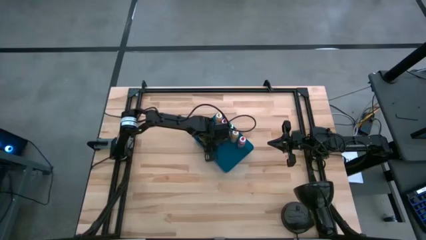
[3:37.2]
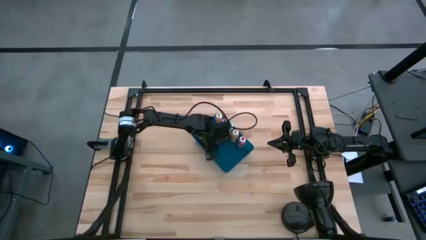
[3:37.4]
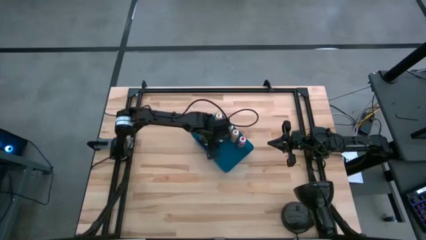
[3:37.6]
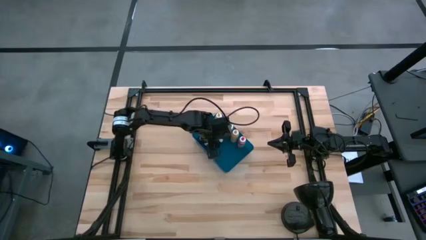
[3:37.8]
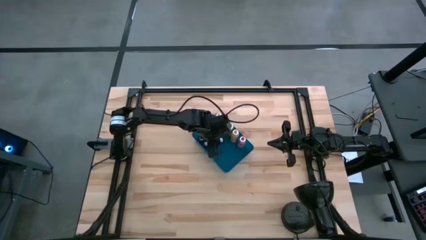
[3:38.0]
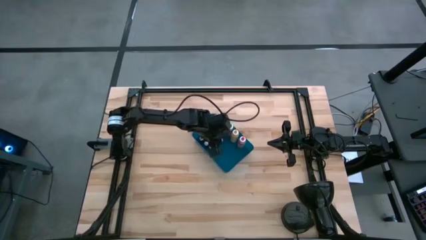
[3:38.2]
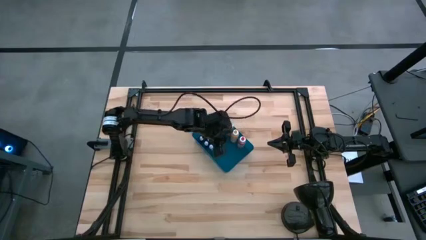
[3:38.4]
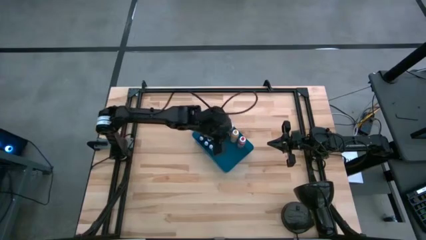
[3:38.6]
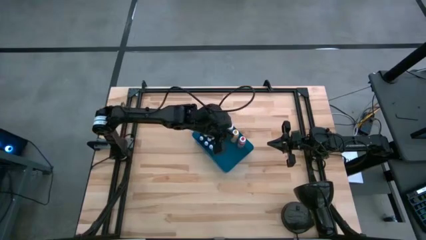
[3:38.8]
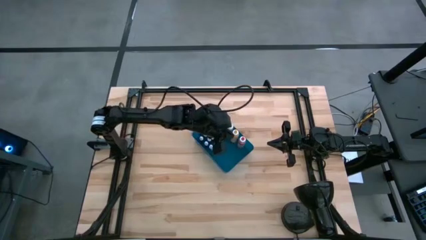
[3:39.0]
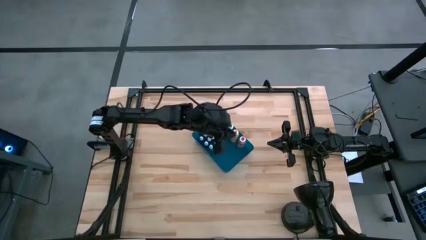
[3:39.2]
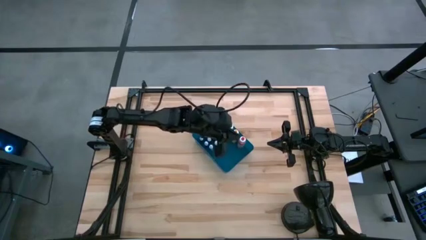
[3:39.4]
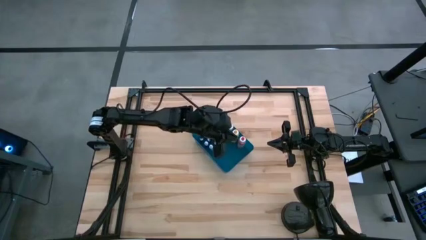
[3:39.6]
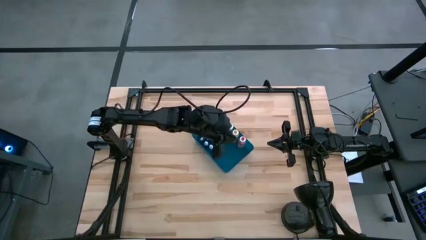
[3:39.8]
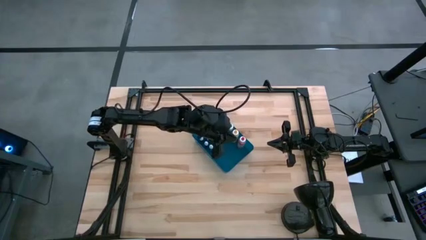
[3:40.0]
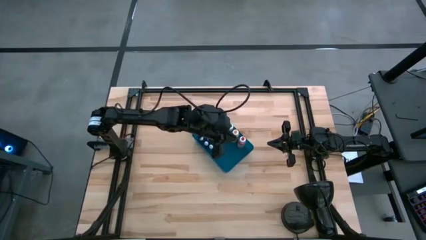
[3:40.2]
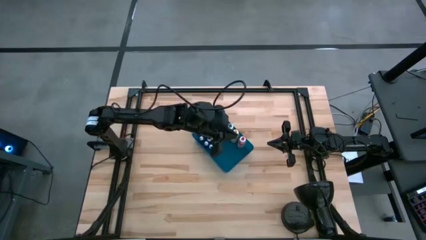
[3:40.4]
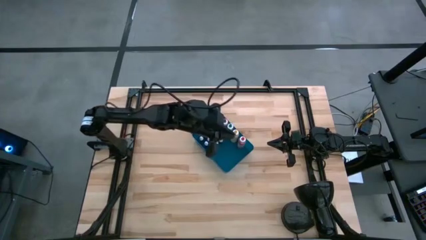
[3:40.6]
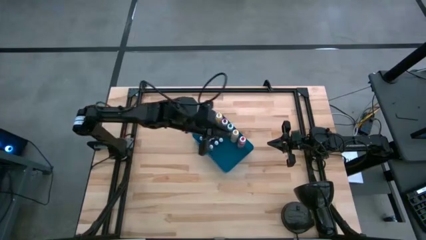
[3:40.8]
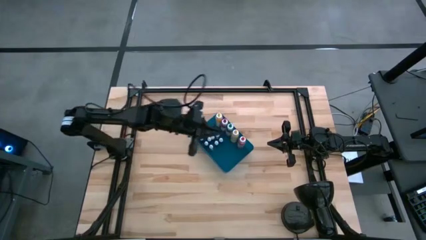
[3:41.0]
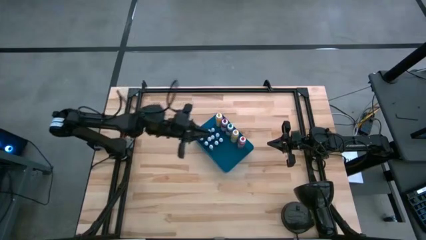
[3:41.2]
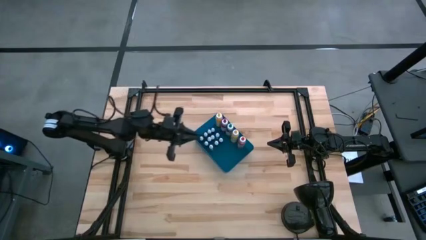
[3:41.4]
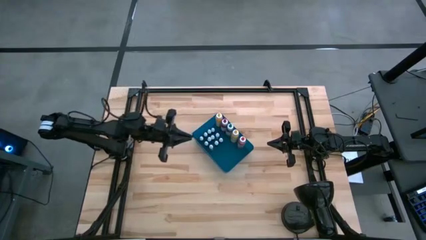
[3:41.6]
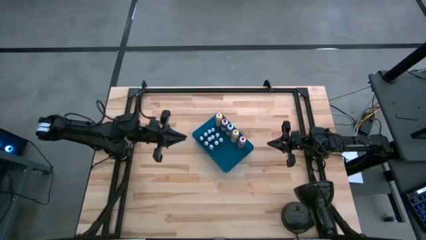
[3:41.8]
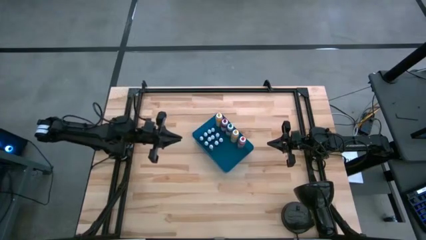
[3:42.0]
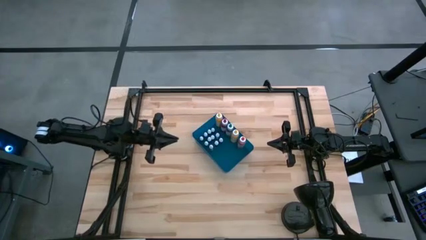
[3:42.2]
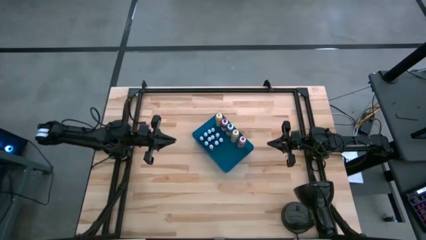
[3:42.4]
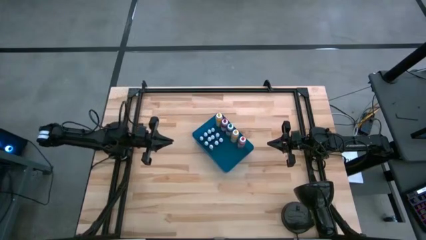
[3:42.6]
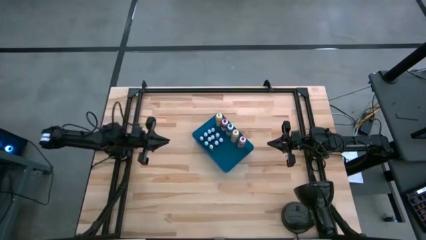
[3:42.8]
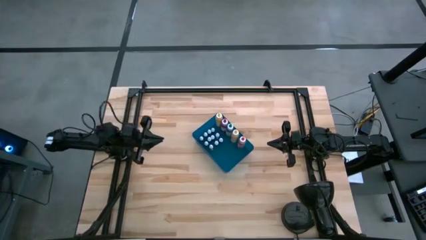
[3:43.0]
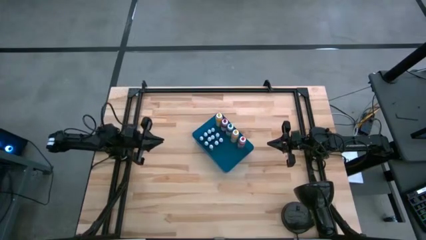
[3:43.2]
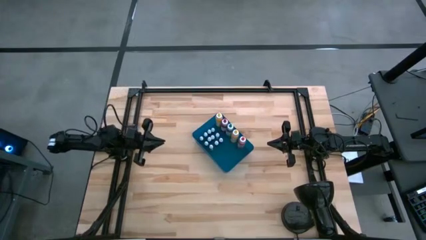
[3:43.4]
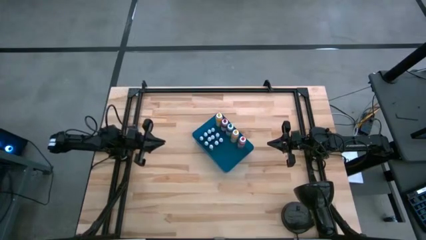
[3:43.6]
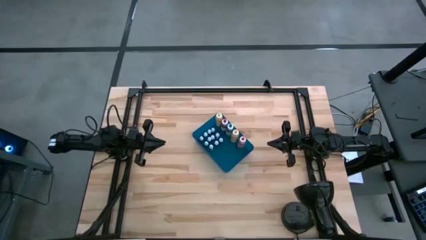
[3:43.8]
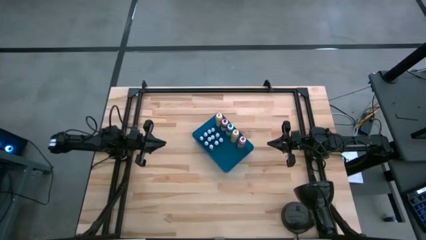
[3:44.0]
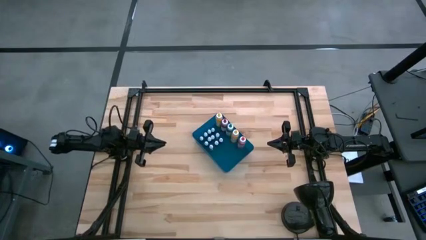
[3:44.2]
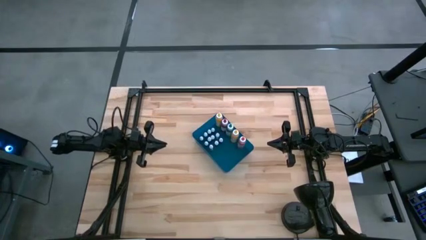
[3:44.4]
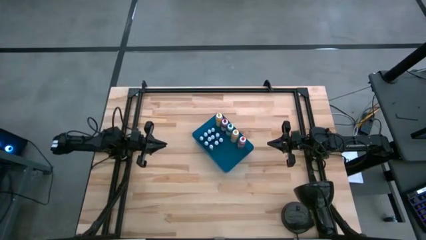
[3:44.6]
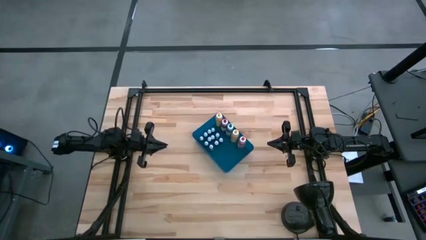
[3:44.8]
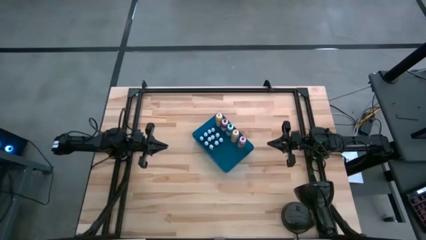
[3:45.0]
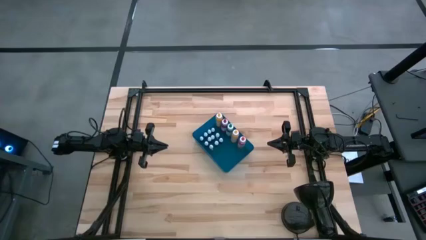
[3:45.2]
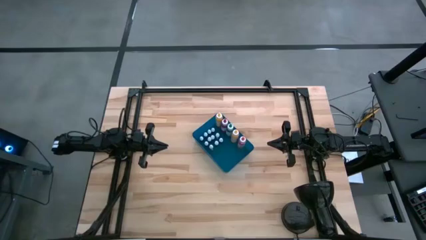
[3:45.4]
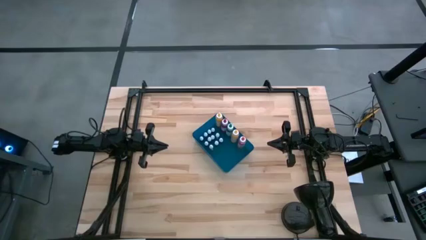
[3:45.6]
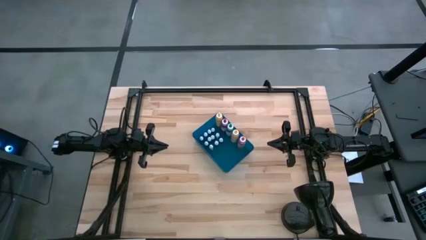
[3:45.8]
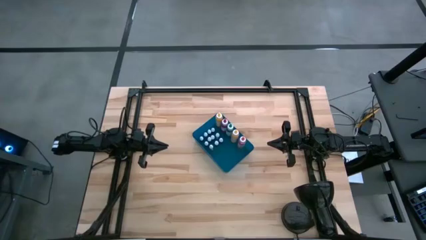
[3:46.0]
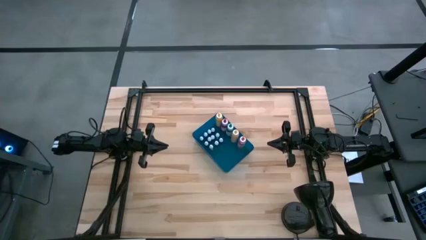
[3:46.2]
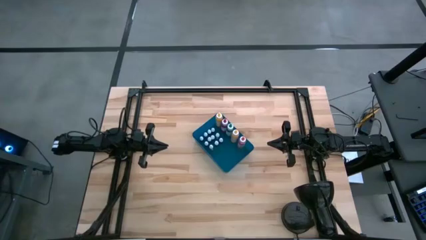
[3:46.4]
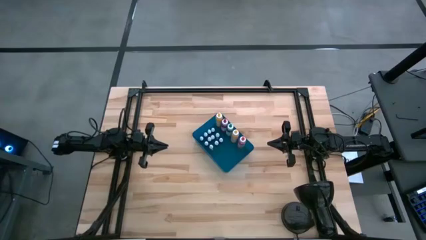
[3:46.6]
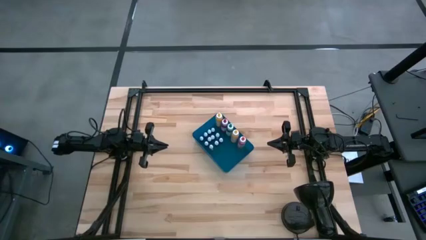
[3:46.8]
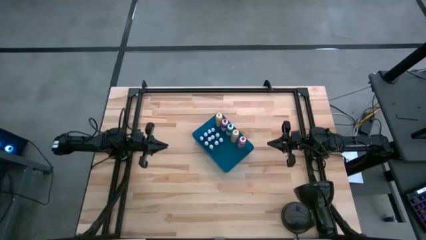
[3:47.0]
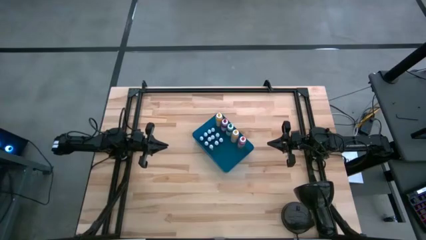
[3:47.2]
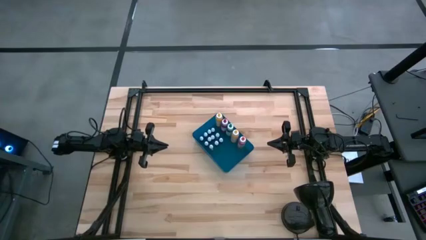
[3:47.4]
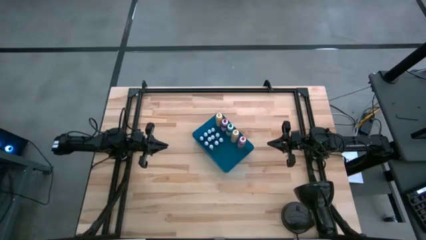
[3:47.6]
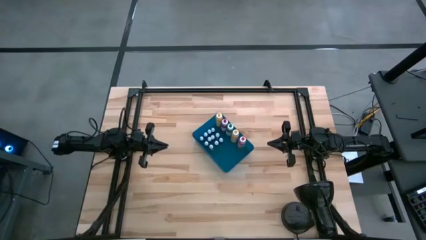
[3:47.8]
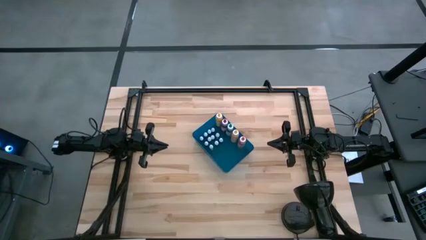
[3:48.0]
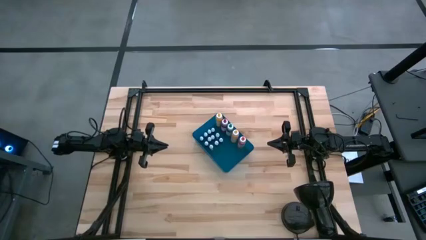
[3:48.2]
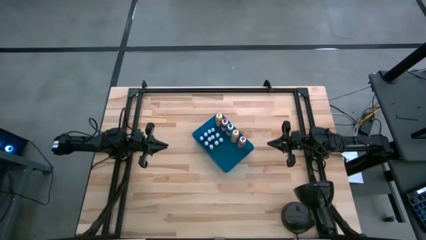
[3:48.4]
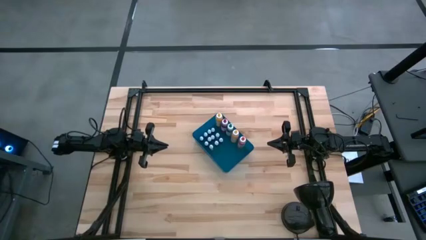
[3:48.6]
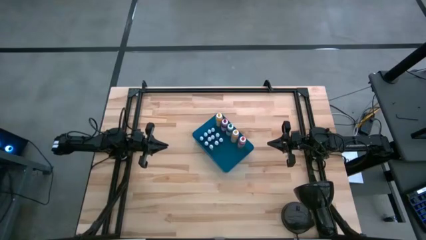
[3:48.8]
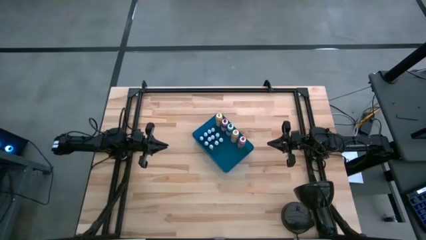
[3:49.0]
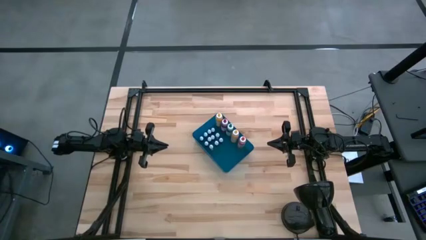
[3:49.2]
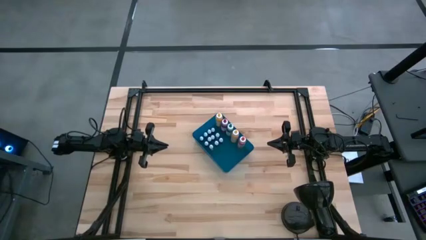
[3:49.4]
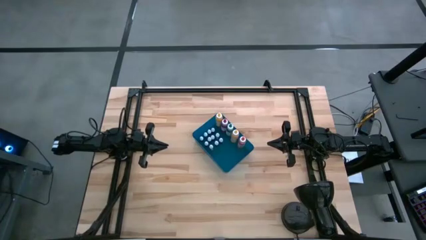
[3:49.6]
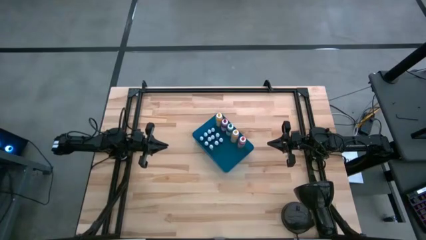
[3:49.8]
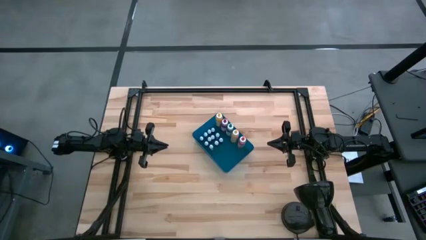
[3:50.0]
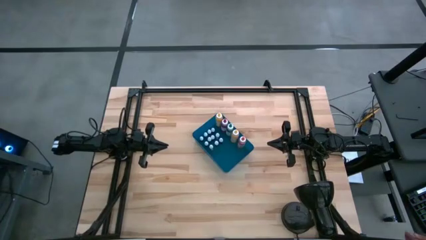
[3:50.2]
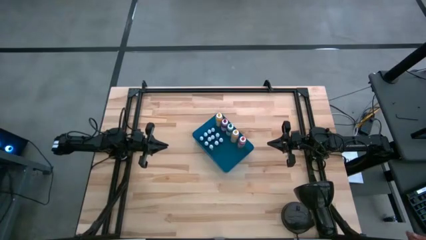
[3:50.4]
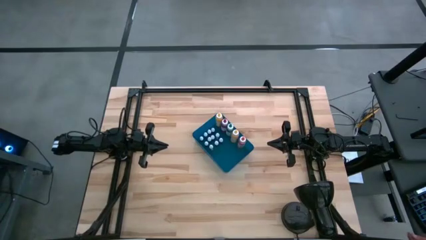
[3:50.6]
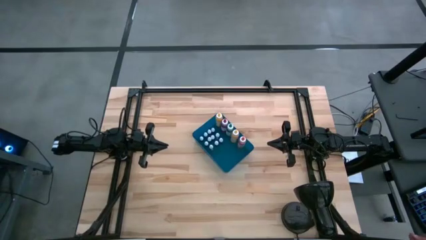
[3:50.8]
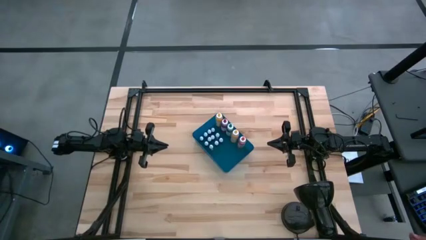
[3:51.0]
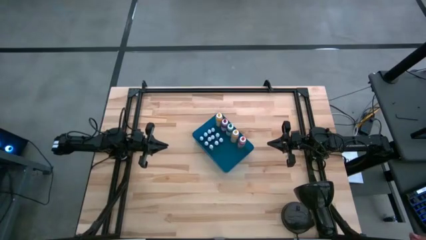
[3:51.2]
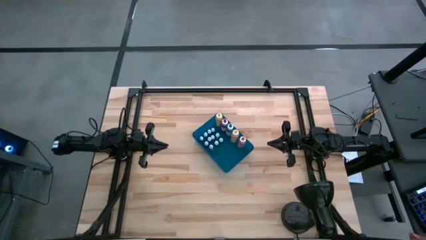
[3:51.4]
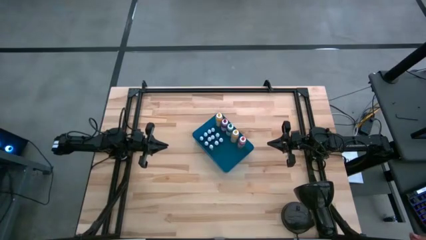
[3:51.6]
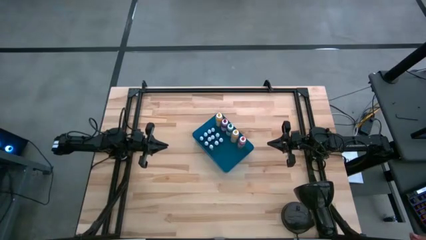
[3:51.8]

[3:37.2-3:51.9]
Task: Pick & Place food coloring
Return to Home Position

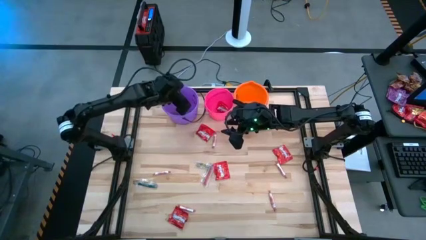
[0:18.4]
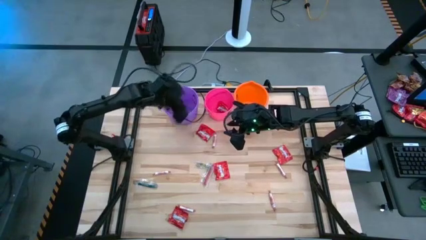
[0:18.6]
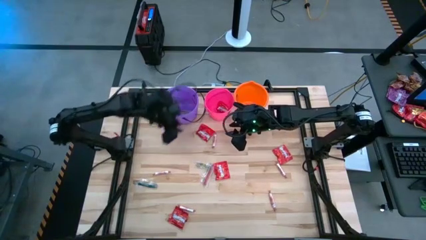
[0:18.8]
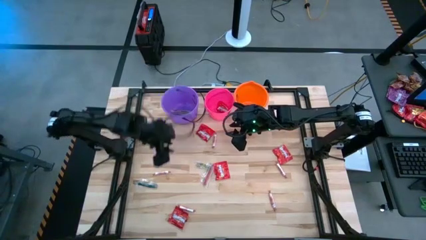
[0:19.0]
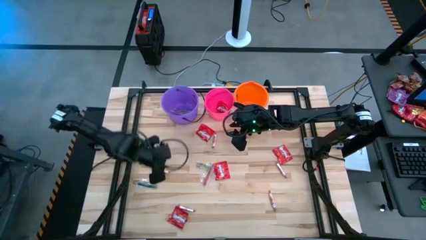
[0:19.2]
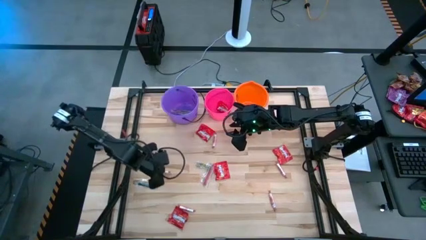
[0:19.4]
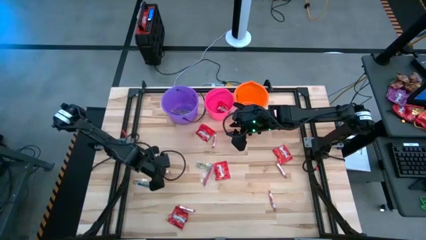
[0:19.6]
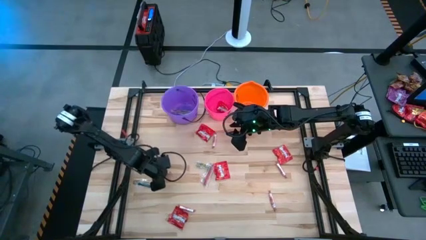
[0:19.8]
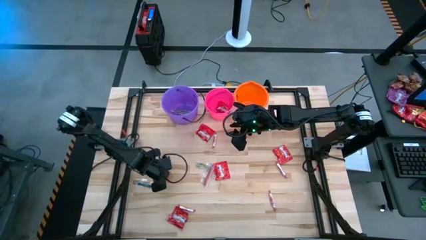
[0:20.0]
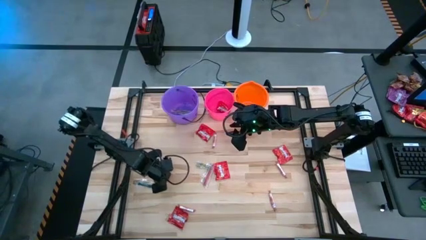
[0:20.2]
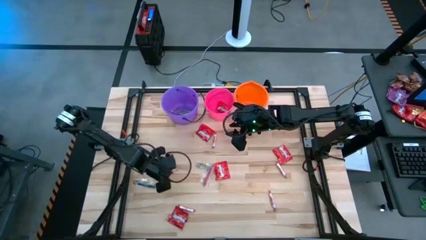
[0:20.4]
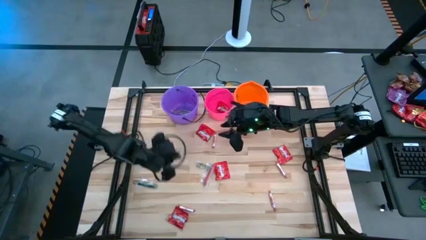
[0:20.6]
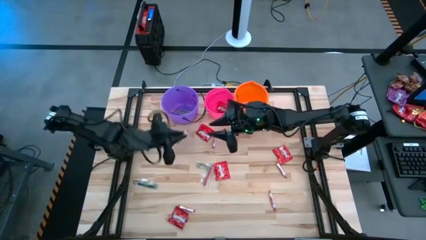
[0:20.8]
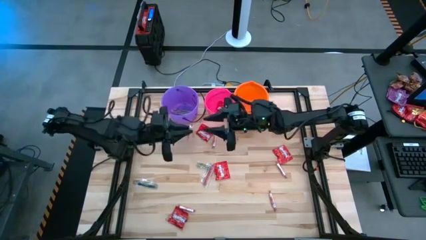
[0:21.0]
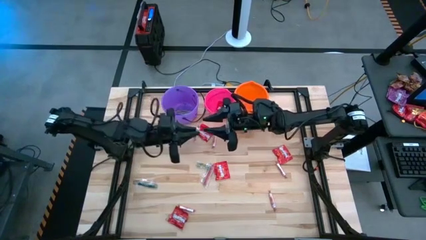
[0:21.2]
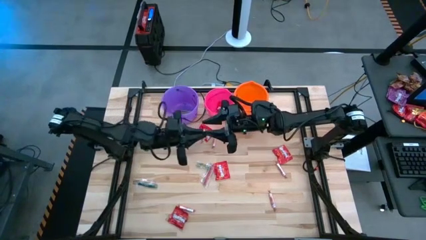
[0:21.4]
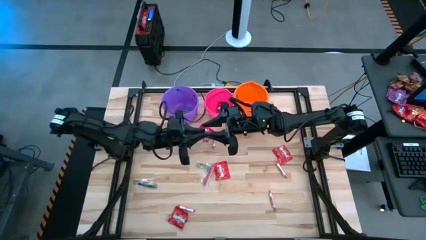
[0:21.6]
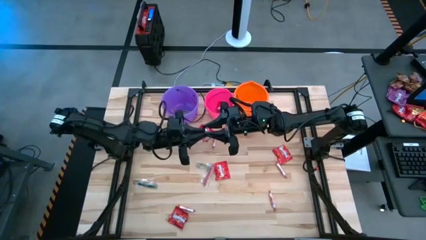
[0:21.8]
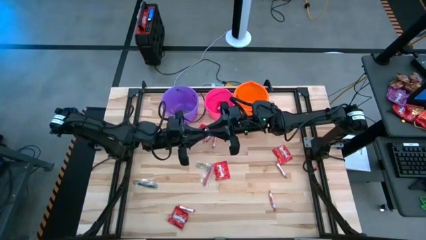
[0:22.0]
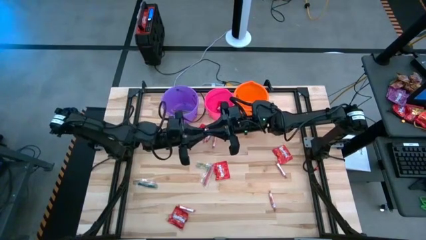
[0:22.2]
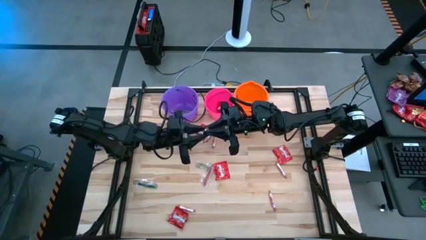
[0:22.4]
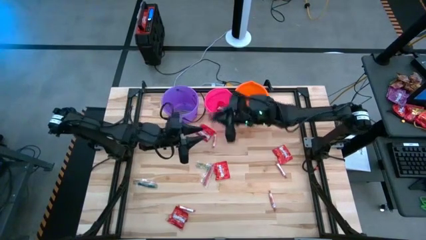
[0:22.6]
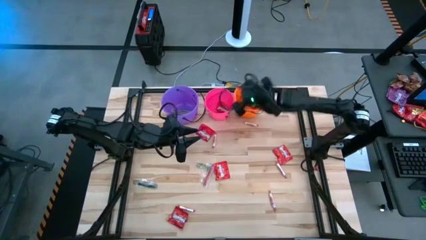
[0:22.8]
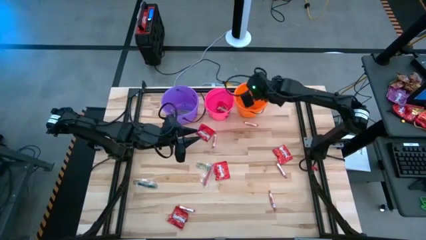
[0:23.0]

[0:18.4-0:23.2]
Task: Sort candy by brand, put in halloween buckets
Put the transparent candy roll into the orange bucket
